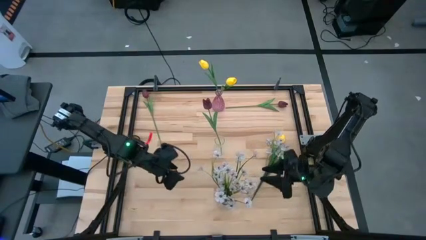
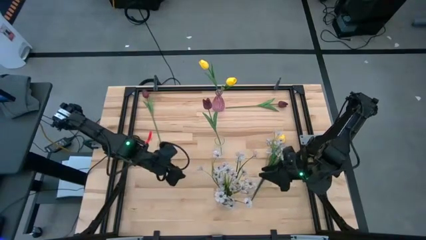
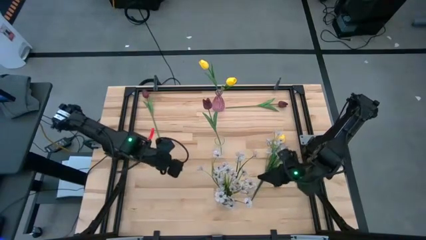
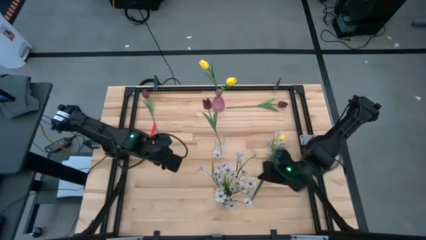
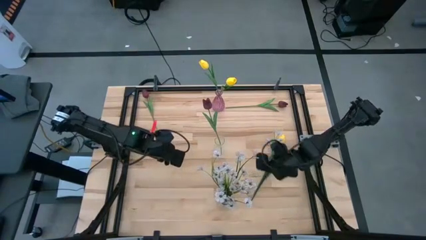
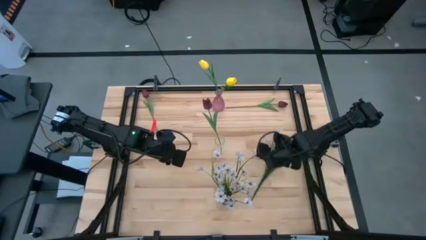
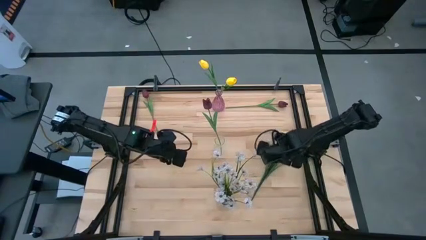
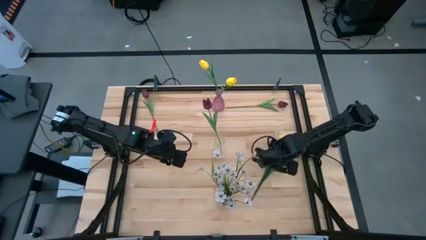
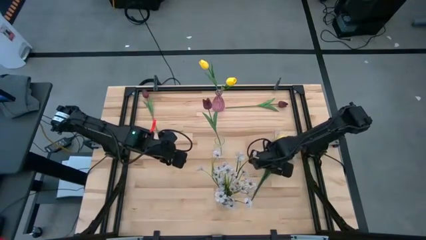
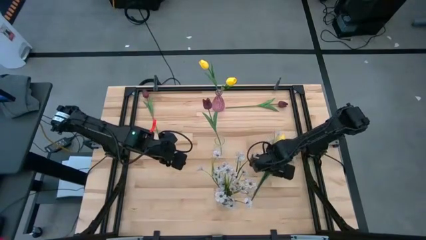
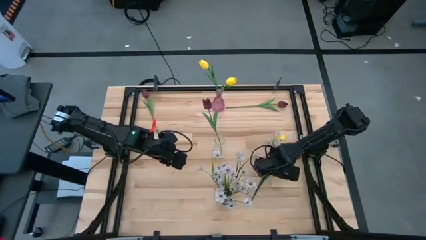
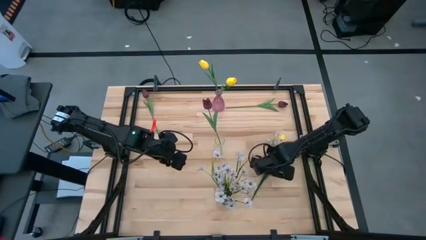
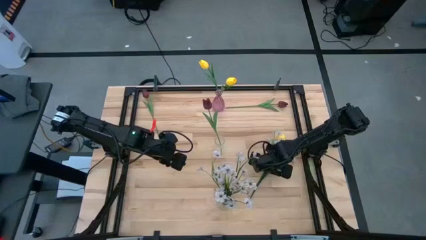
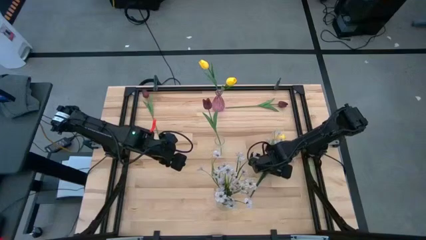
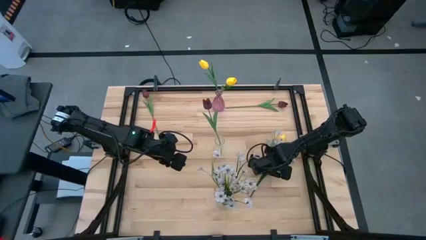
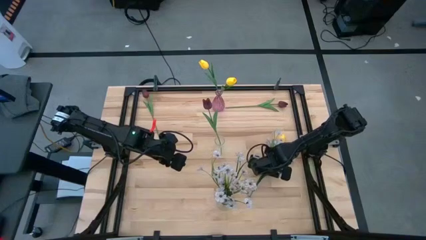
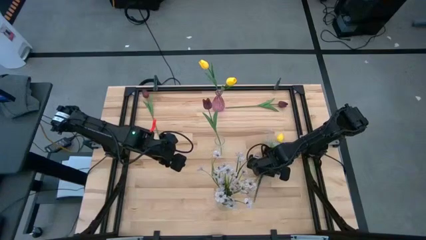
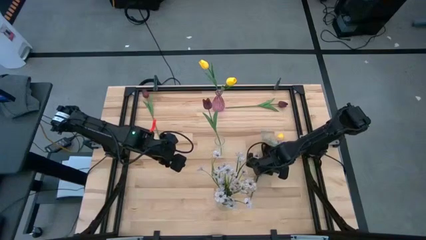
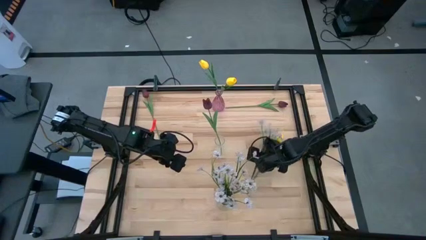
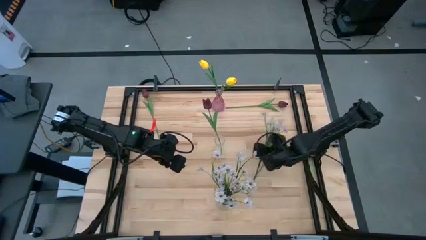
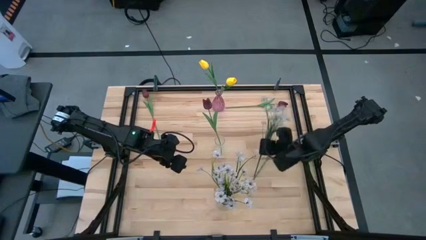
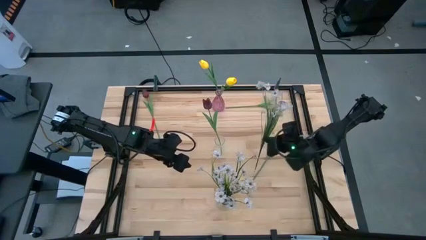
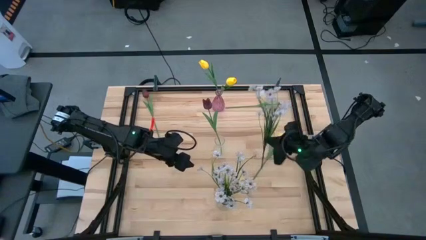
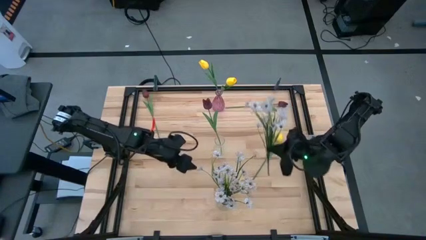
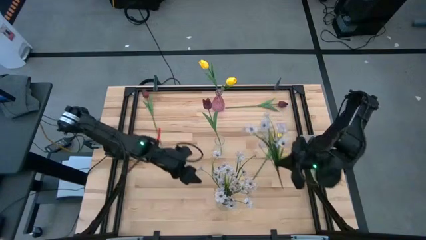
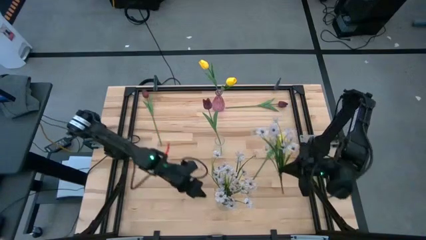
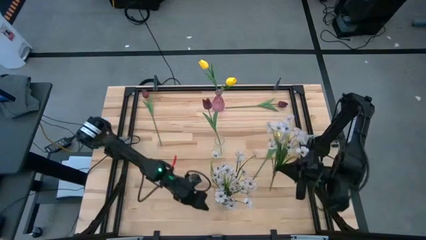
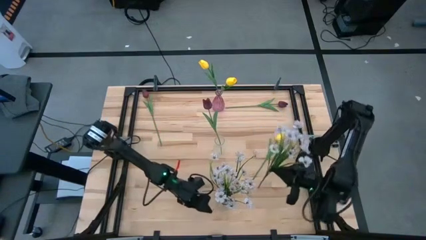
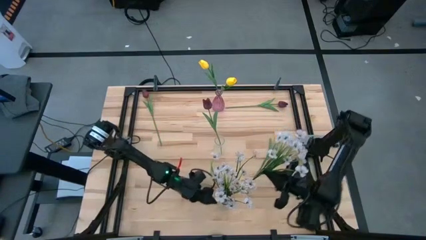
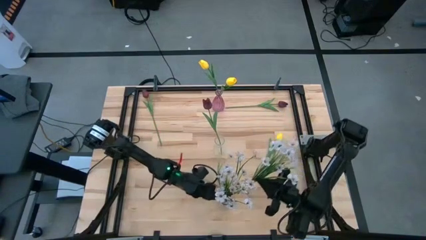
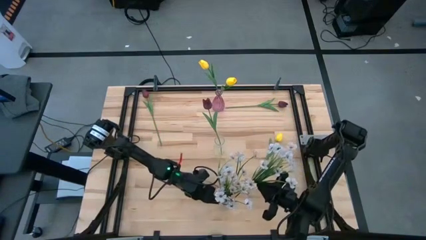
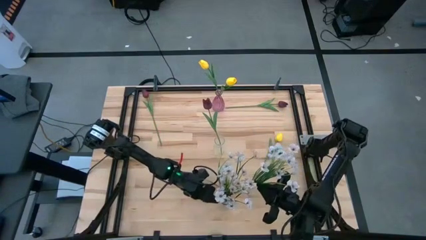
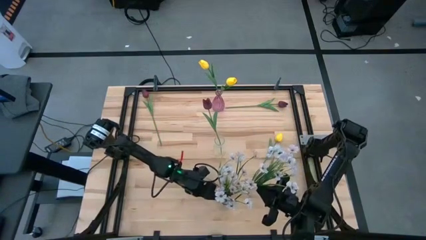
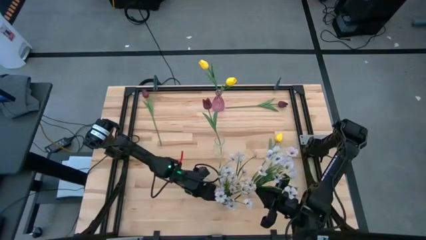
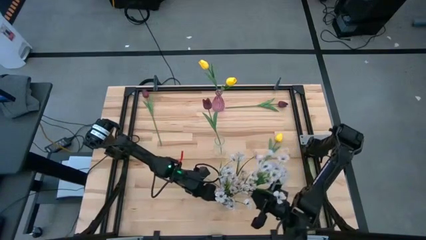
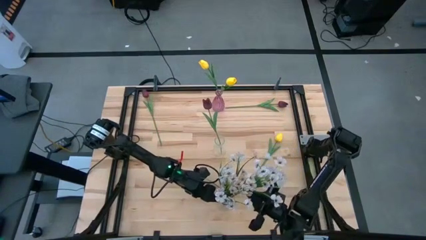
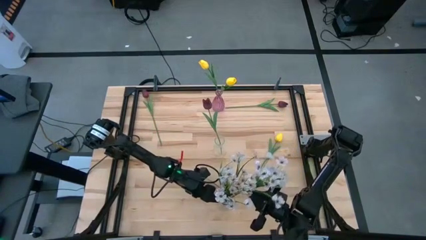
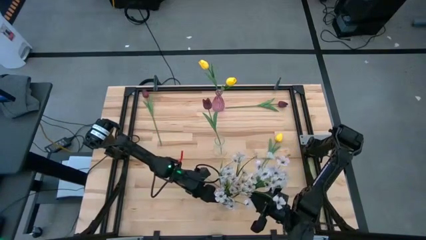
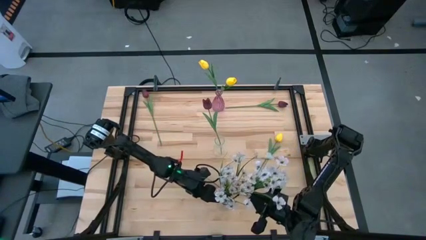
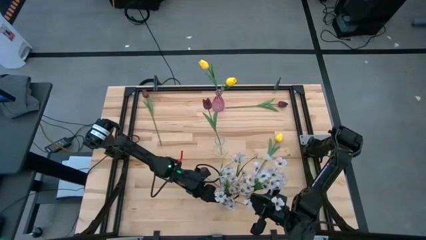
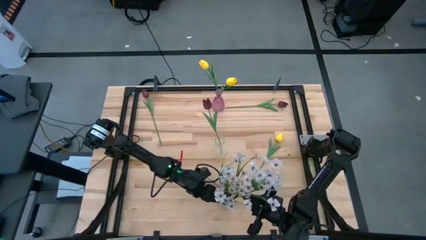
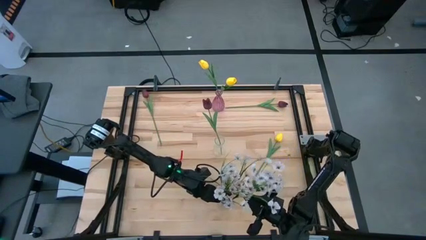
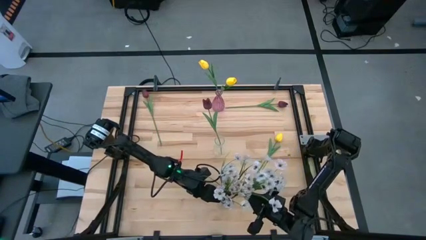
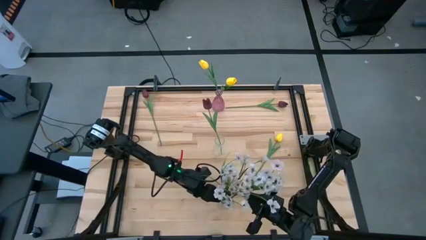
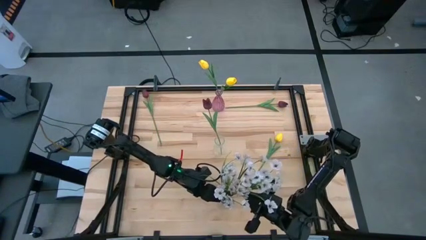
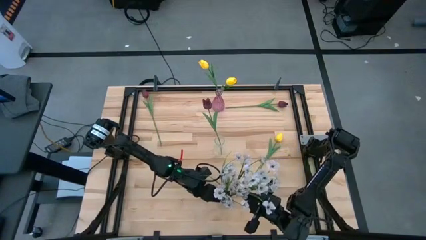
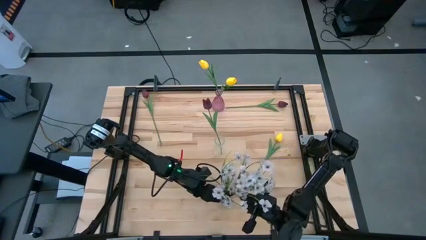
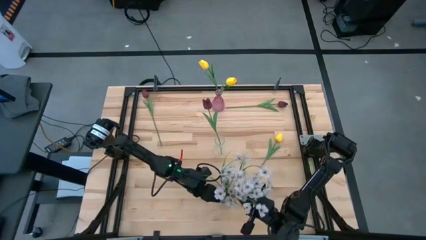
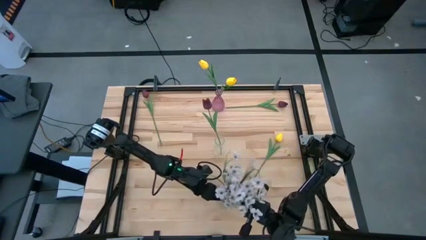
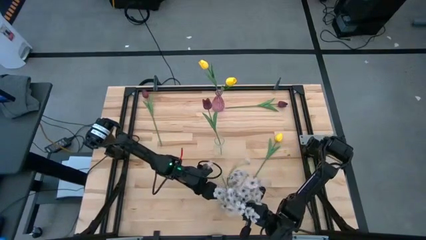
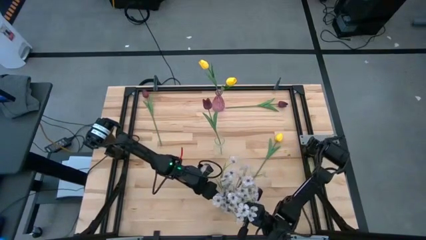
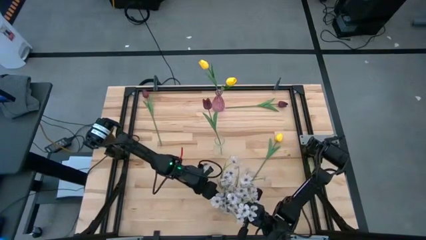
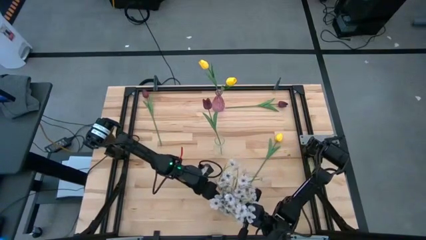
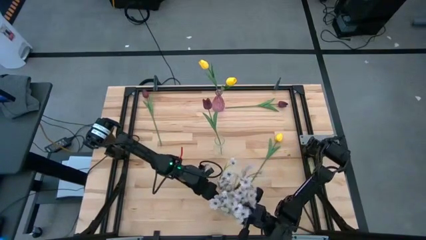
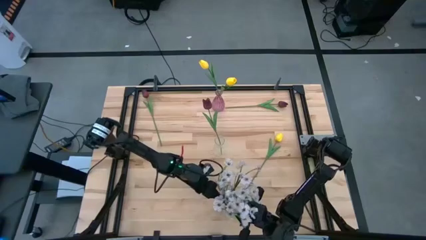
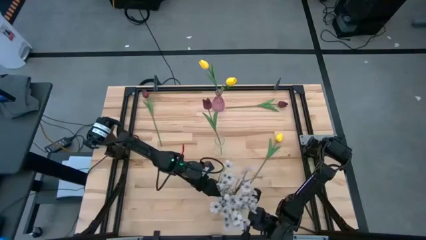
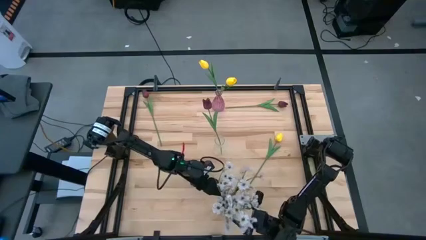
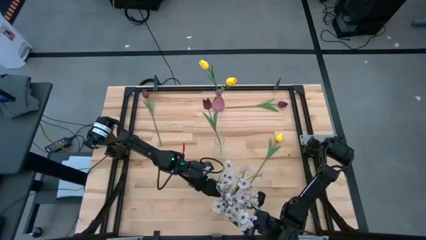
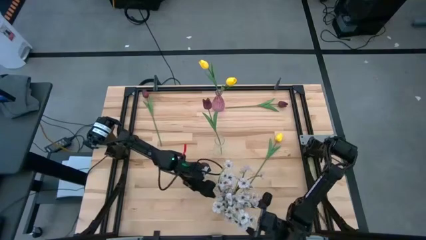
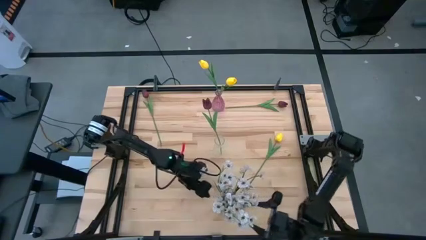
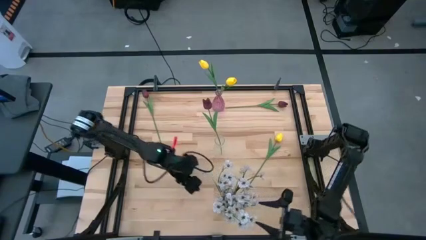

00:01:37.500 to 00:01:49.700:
Task: Sort flowers into vase by color
Put the white flowers into the bottom transparent vase

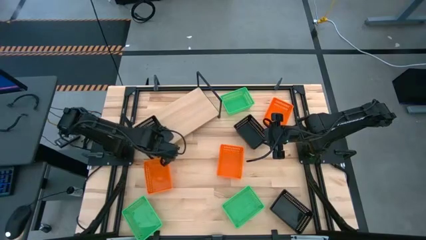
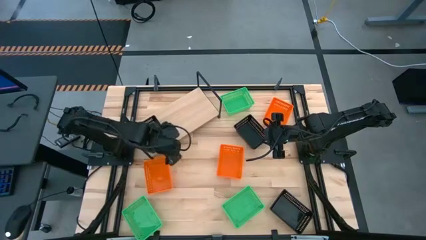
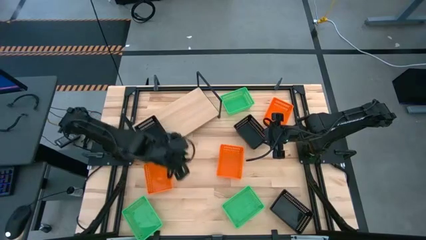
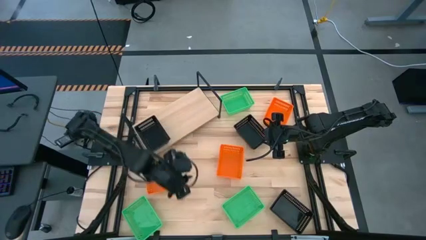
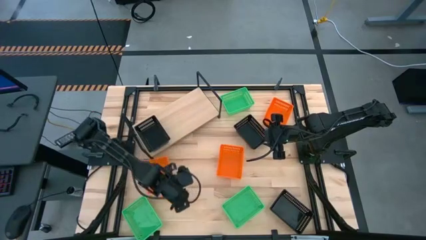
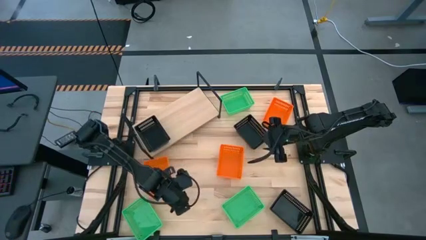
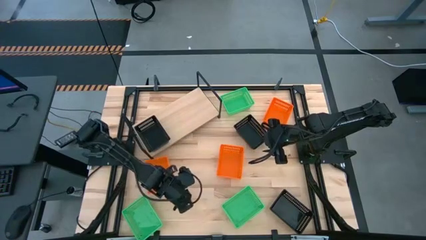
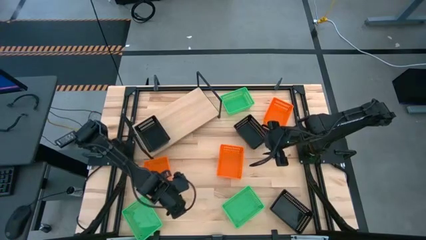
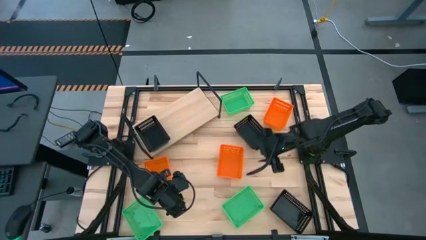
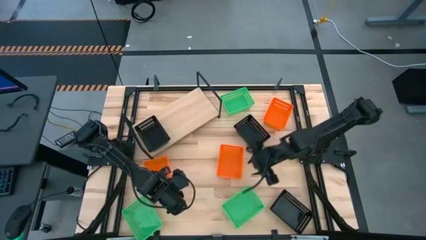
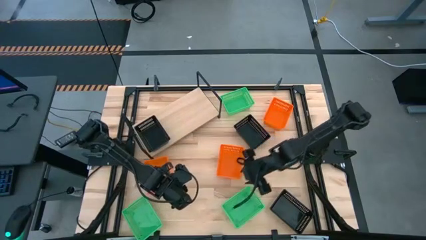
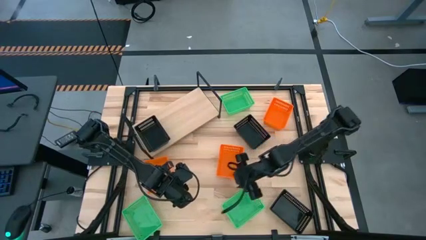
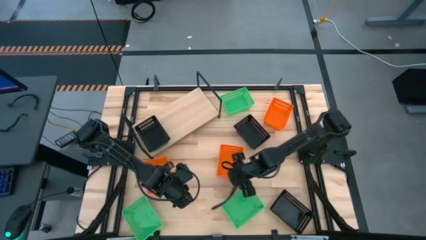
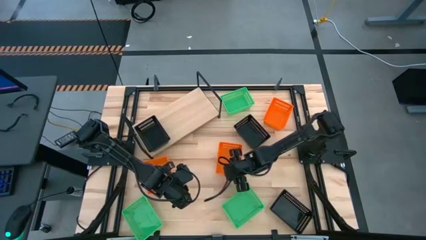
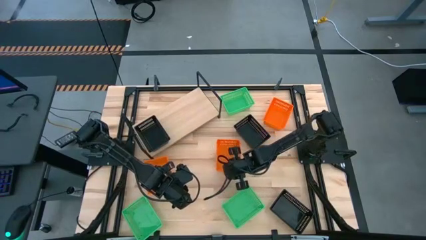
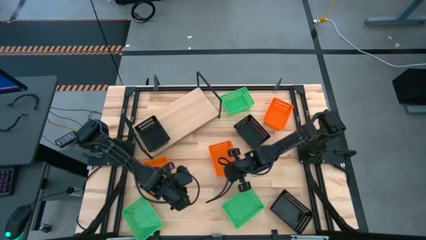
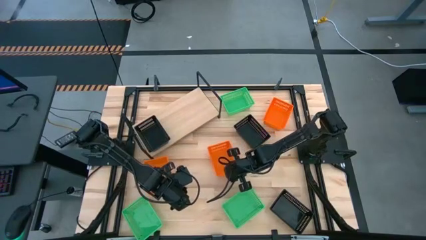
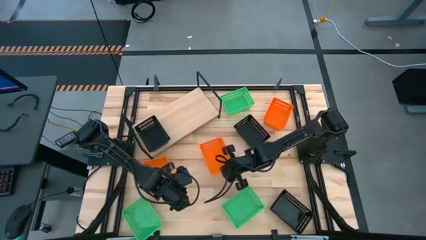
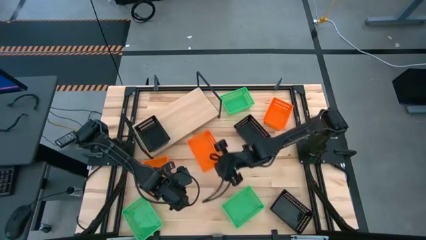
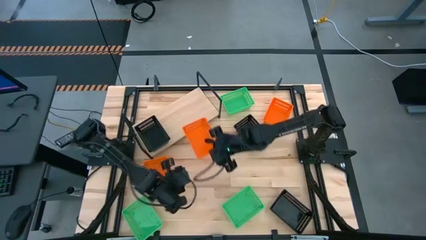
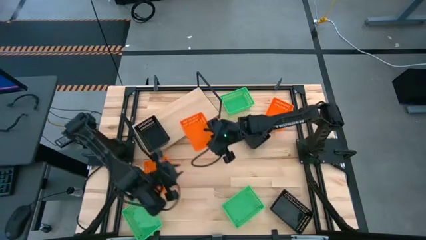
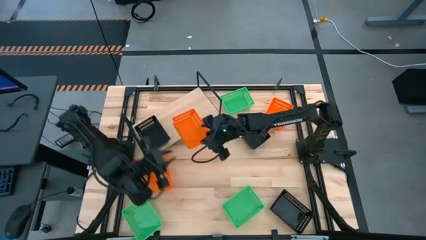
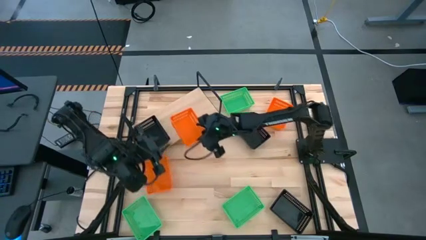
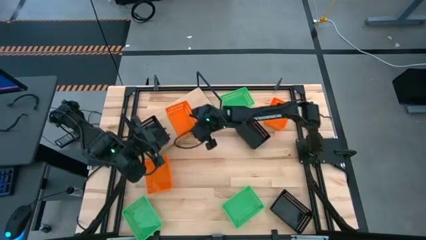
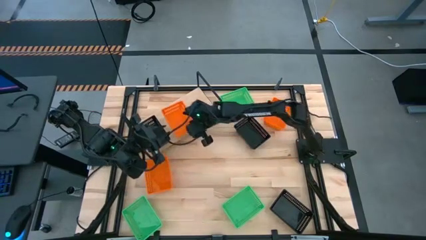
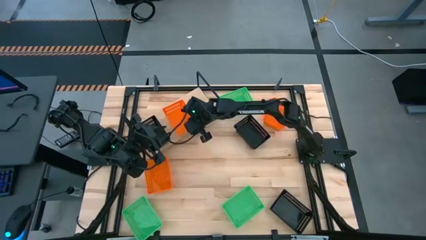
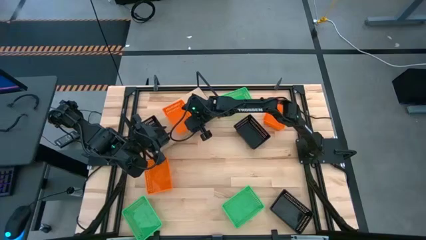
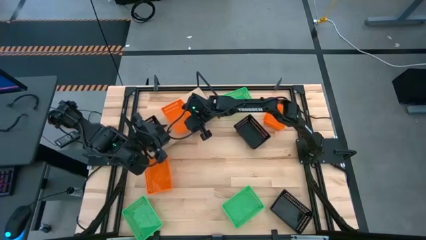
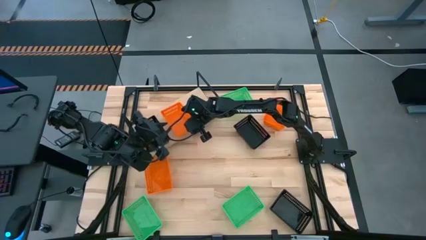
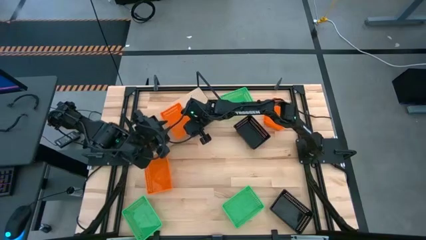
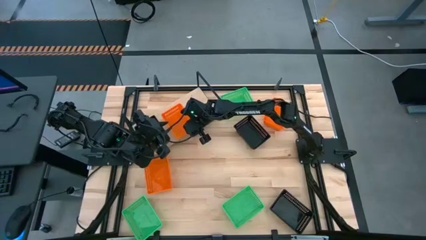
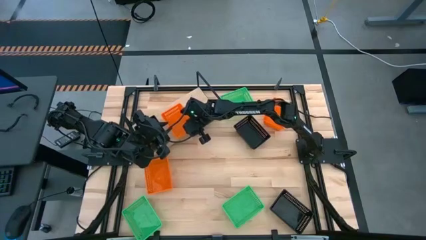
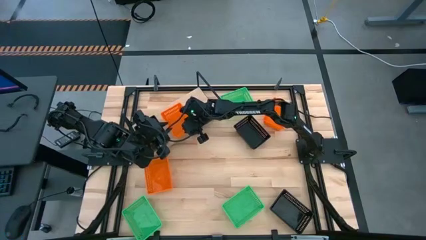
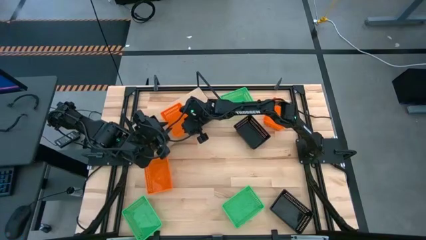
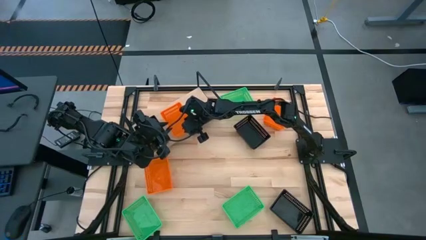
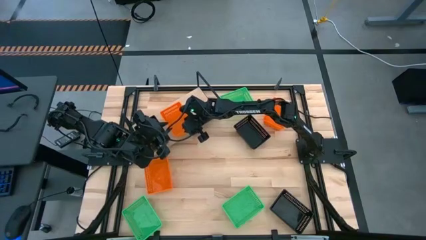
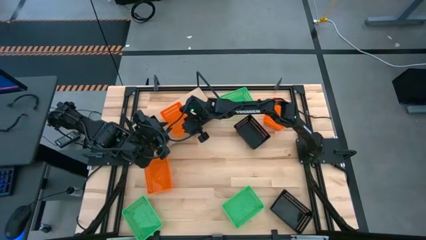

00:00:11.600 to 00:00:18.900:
Task: Stack baskets on shelf by color
Put the middle orange bin on the shelf
